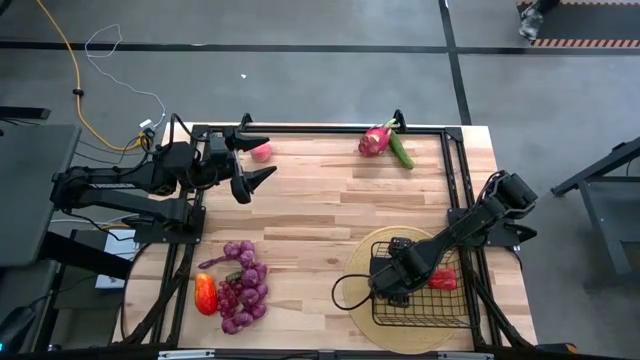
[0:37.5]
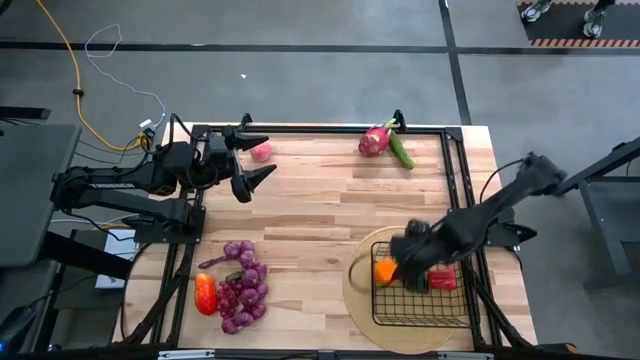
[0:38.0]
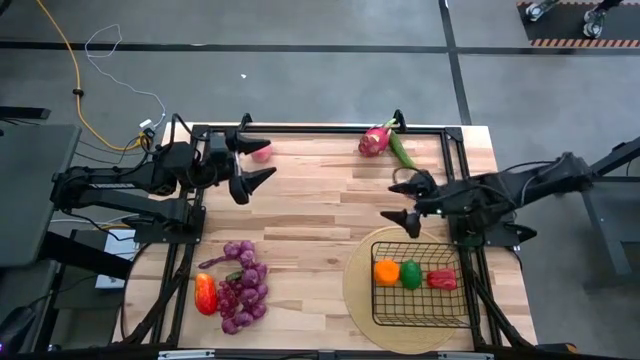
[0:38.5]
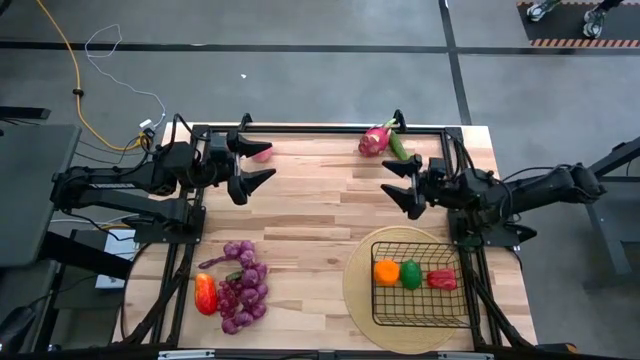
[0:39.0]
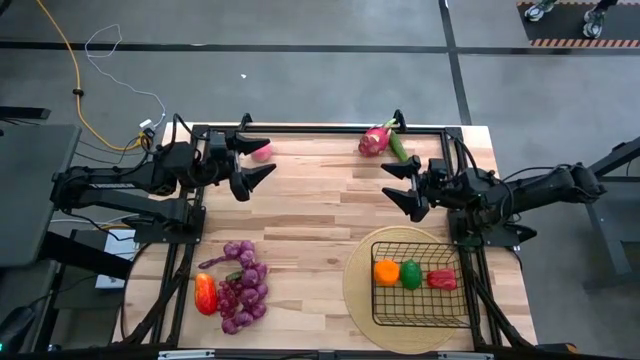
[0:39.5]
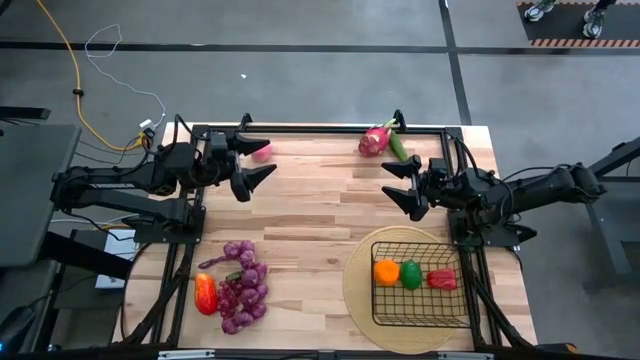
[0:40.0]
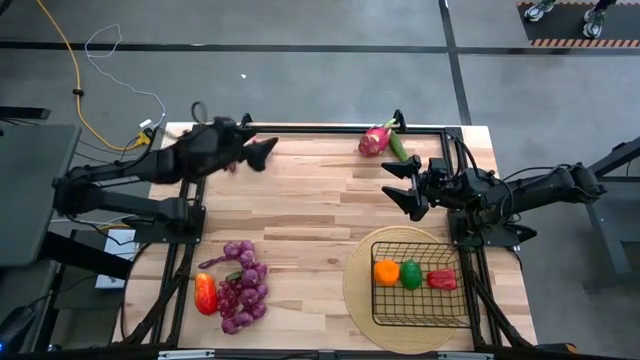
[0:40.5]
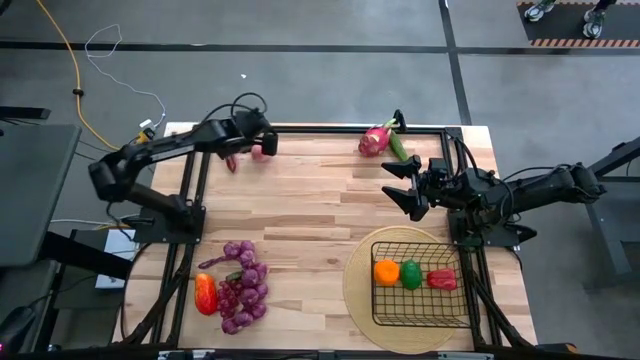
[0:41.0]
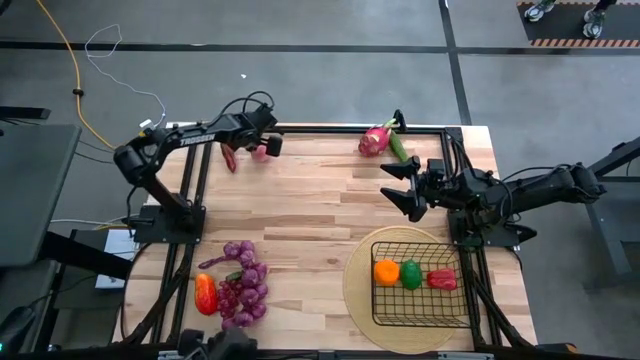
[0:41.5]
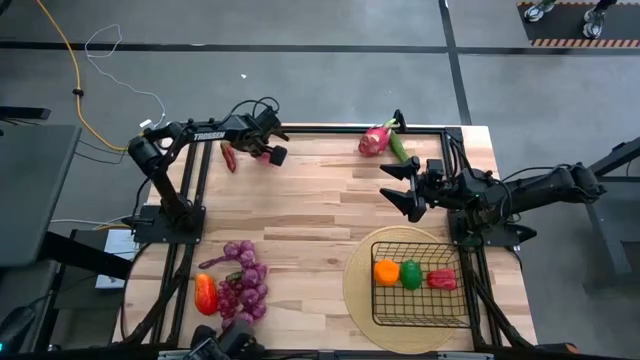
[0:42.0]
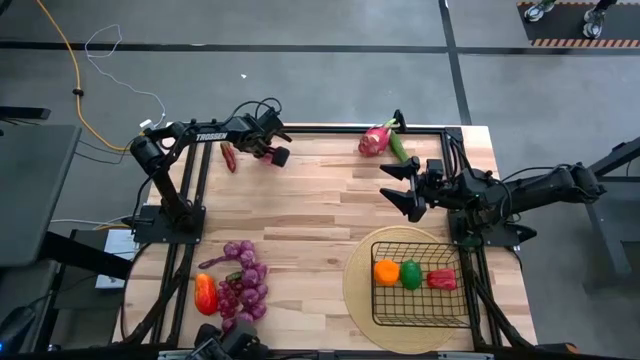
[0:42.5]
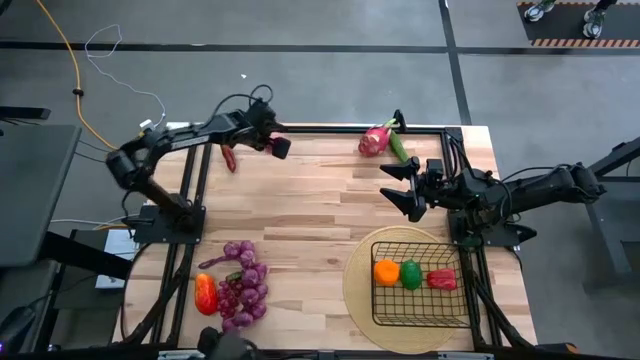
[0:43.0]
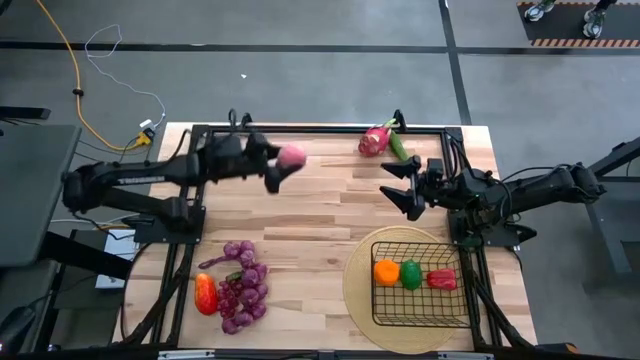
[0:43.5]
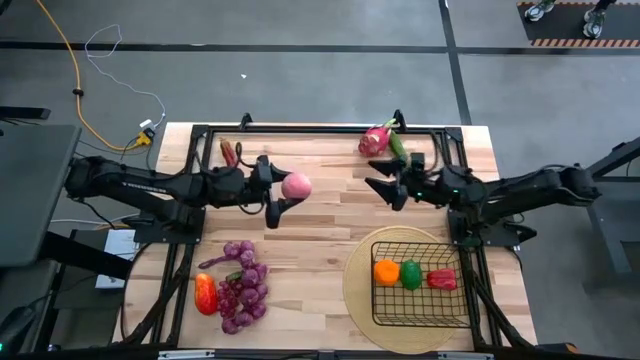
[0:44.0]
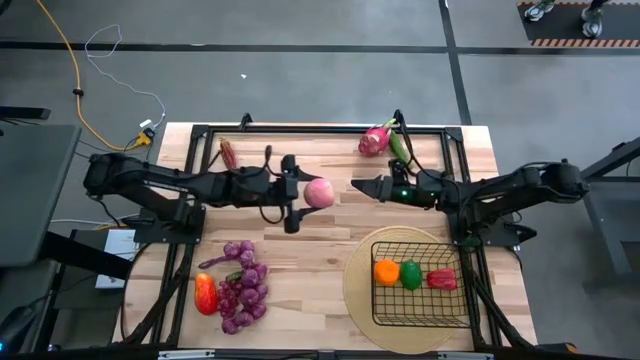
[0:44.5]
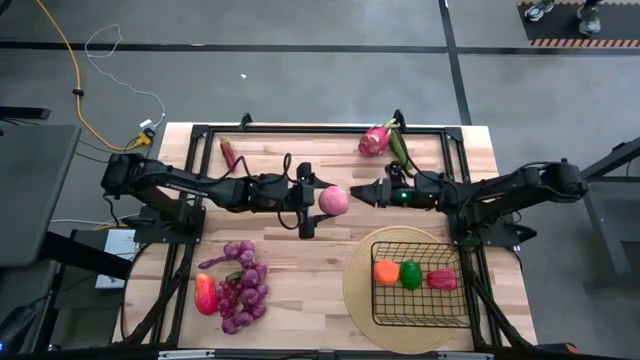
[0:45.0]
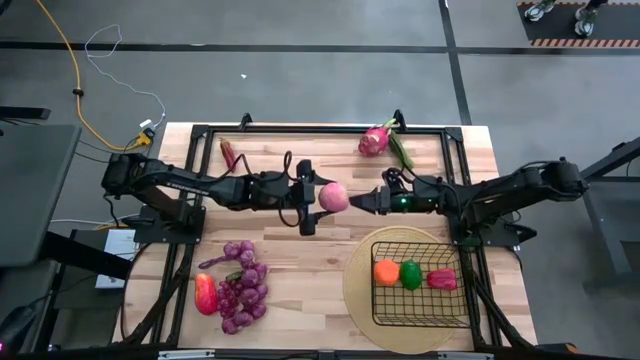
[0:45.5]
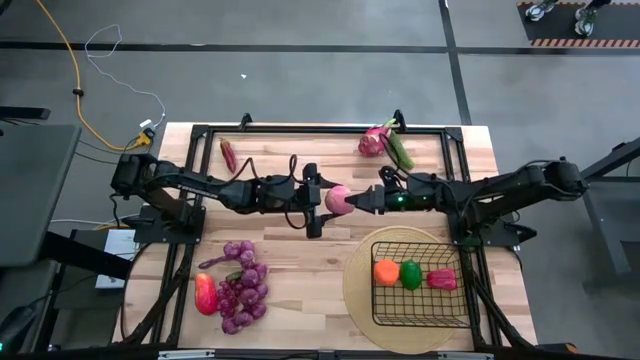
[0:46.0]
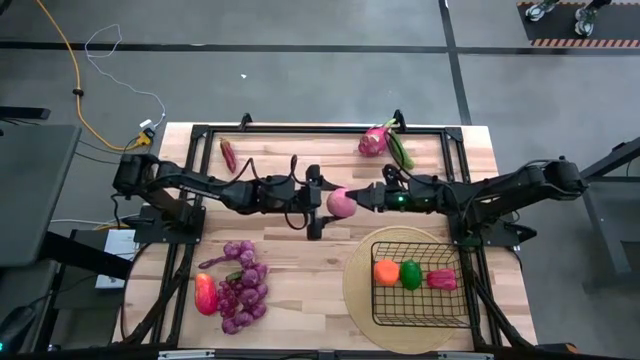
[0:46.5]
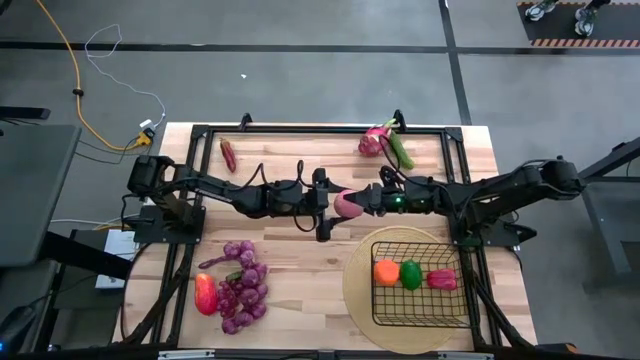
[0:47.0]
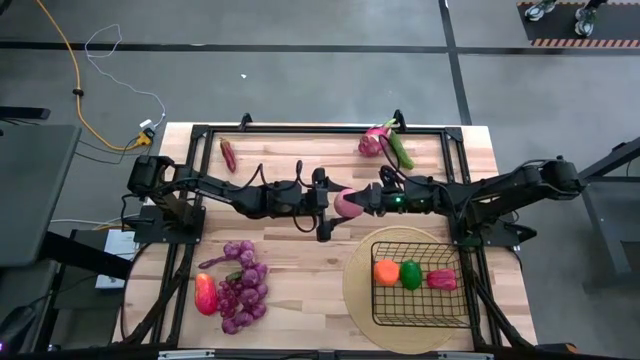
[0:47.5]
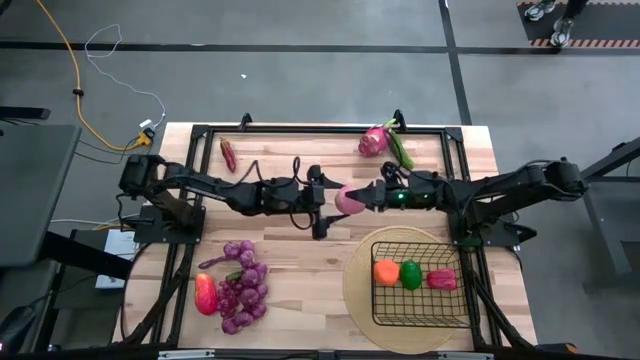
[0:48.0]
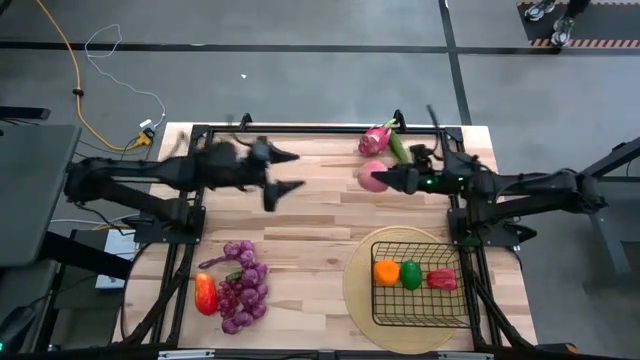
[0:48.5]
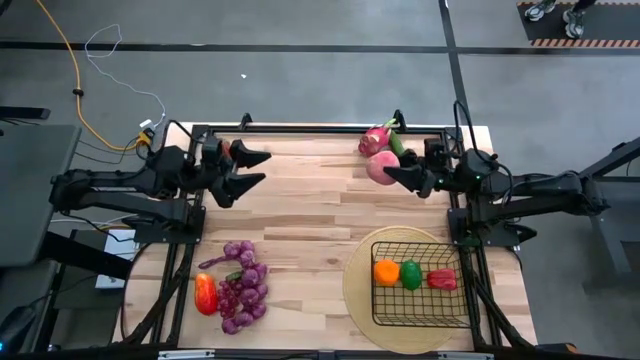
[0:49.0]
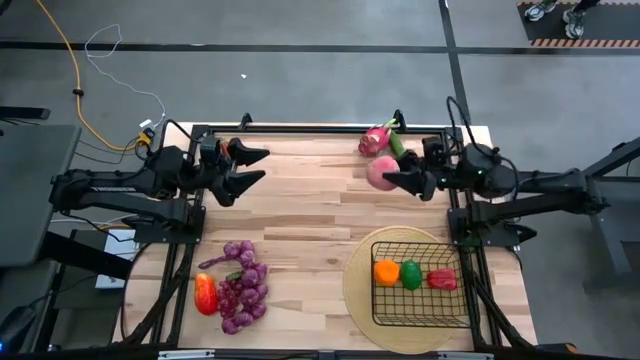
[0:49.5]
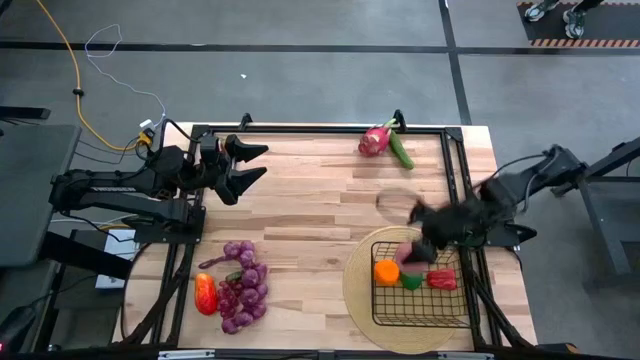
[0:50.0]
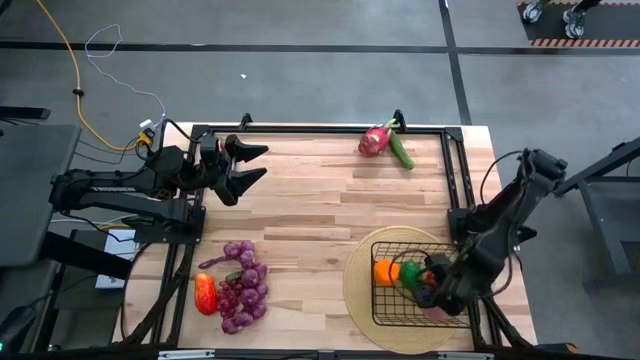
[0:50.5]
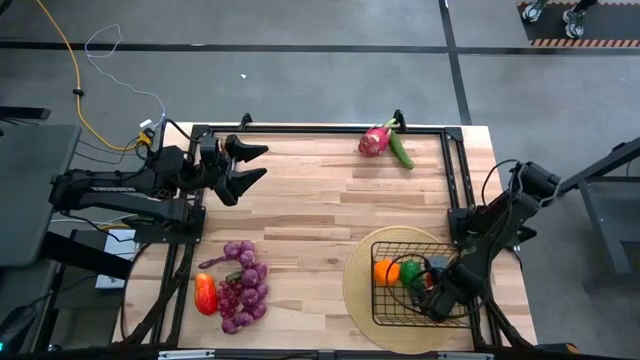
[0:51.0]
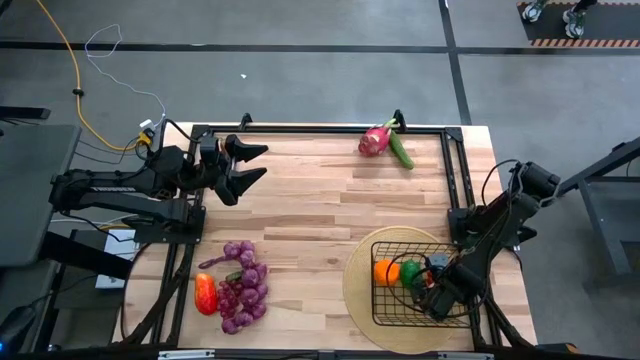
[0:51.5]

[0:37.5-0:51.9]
Task: Build produce basket
Put the peach into the wire basket

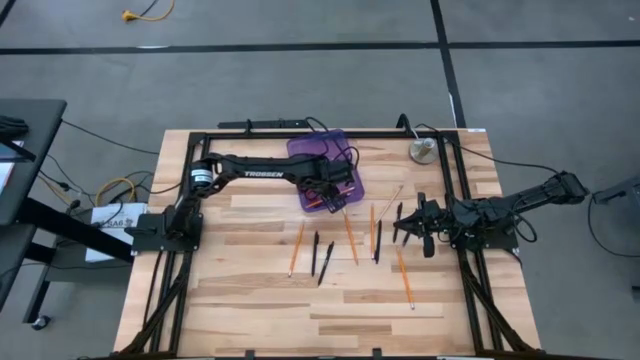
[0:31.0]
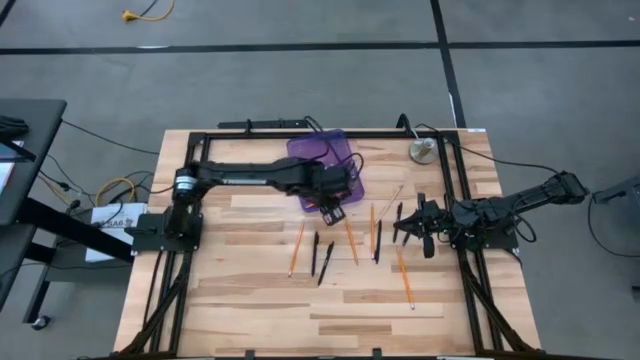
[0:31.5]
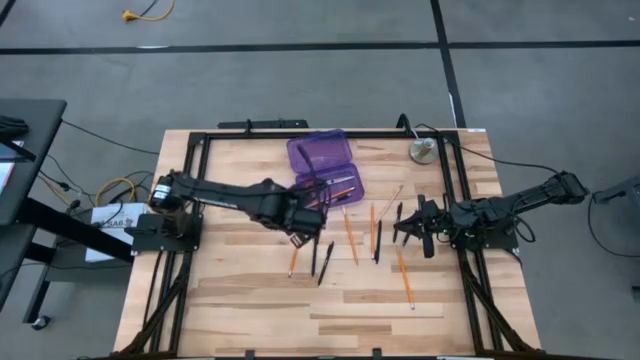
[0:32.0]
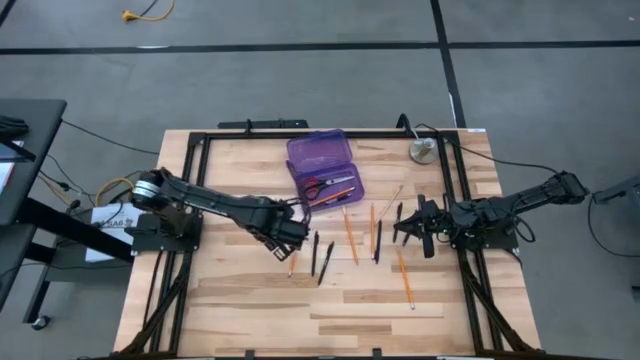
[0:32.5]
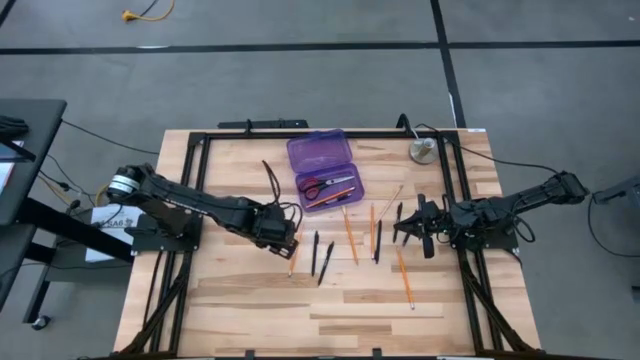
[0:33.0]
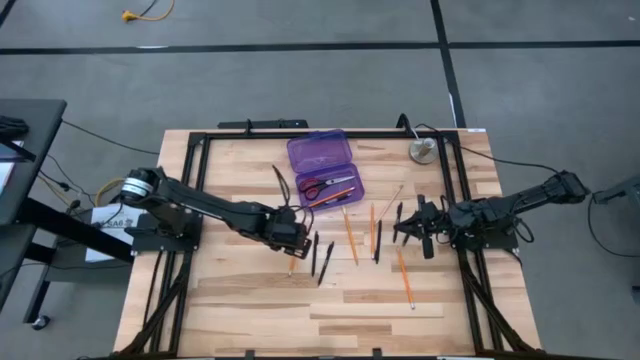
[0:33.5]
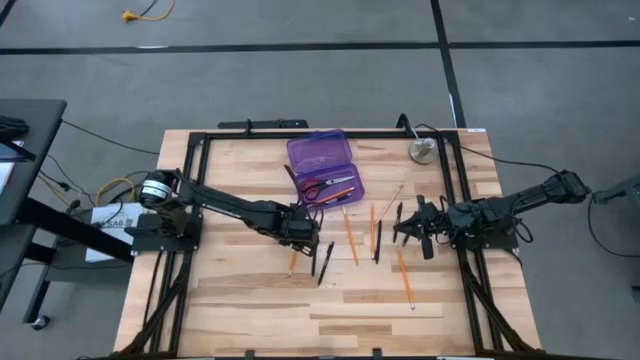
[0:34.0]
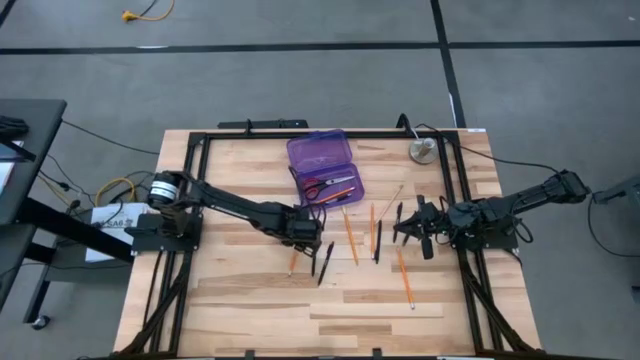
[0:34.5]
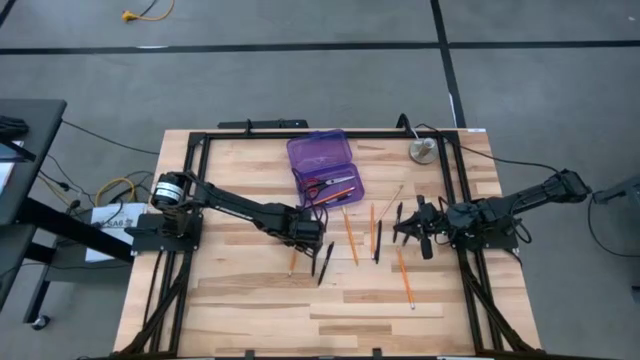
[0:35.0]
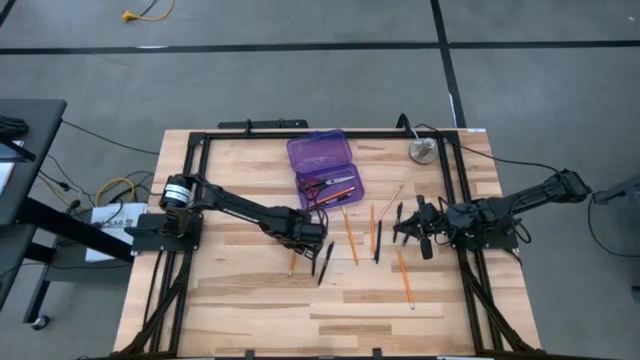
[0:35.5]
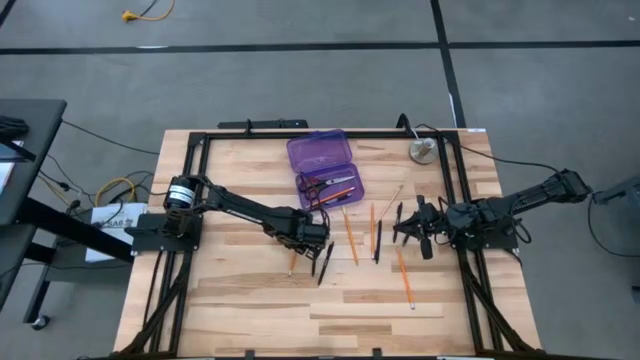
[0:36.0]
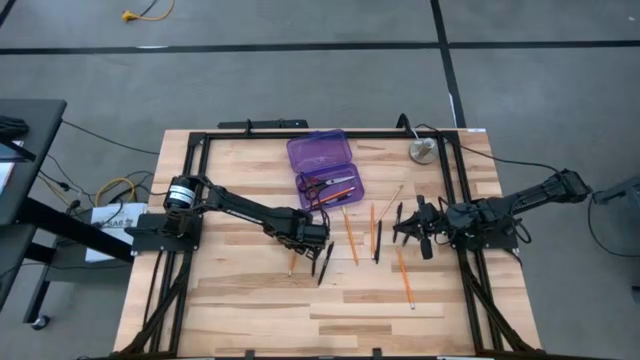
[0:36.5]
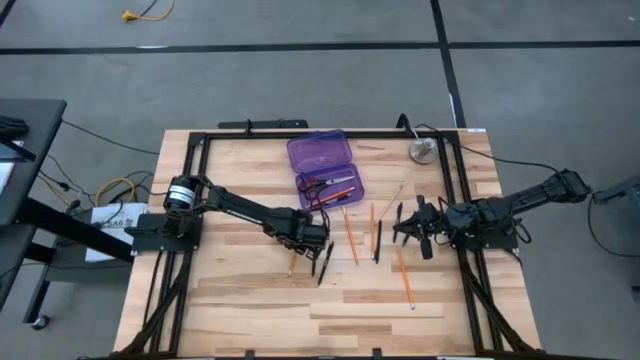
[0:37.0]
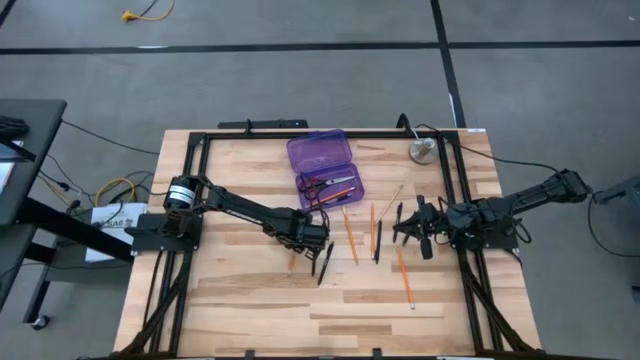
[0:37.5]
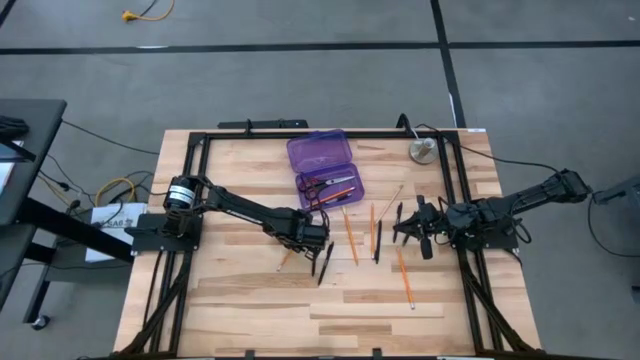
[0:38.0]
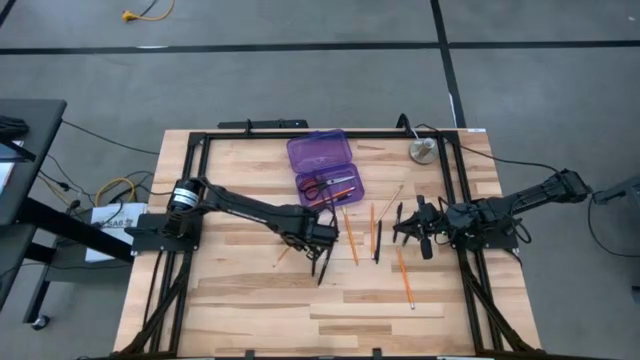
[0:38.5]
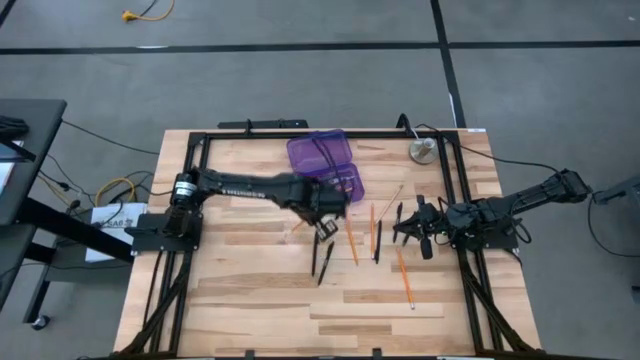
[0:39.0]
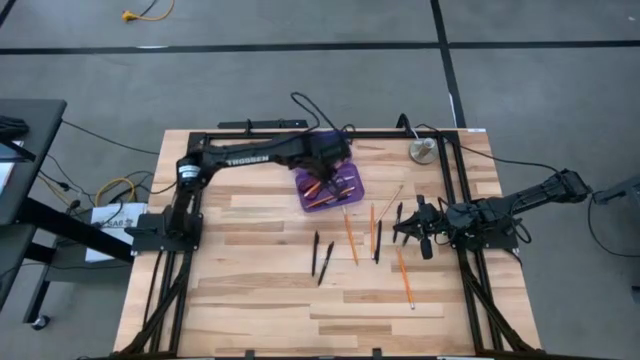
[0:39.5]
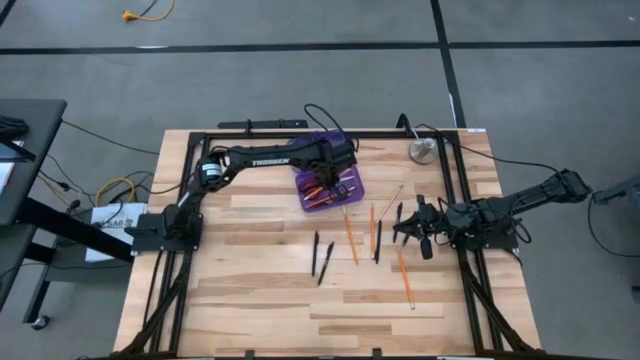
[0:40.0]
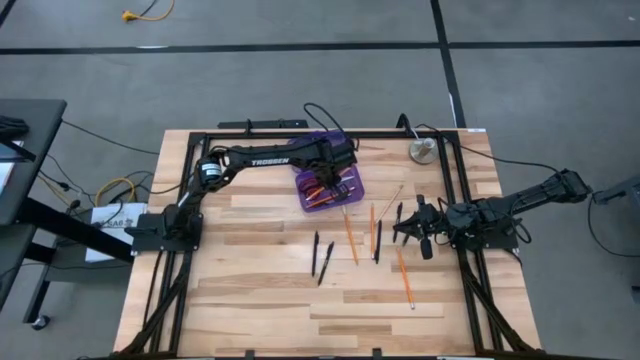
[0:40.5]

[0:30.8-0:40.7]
Task: Pick & place school supplies into a supply box
Put the yellow pencil into the purple supply box
